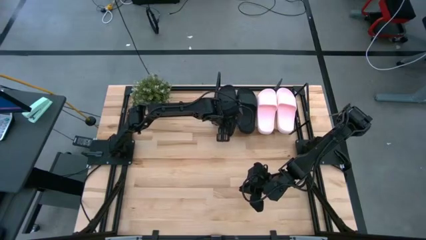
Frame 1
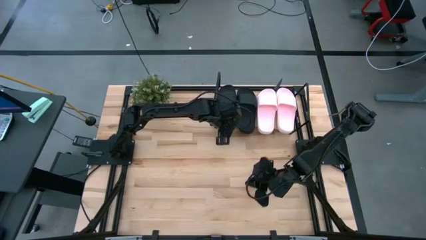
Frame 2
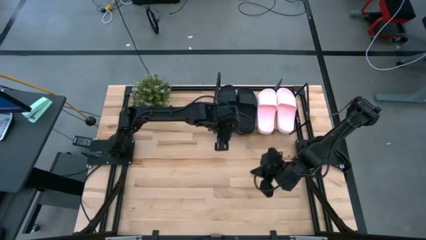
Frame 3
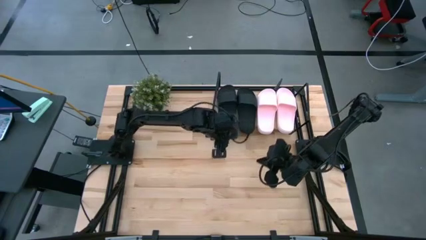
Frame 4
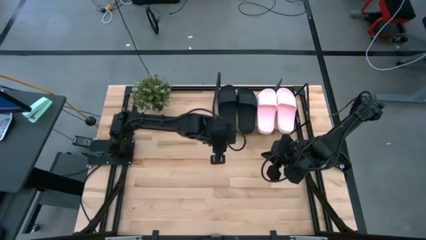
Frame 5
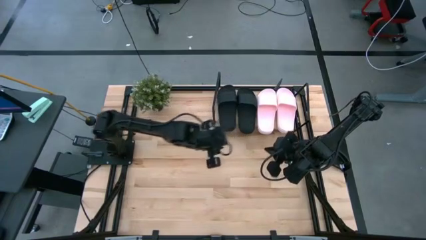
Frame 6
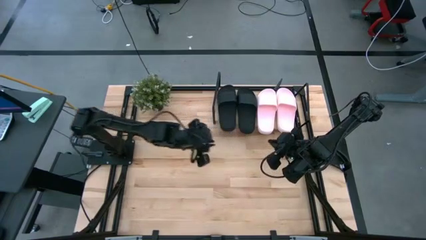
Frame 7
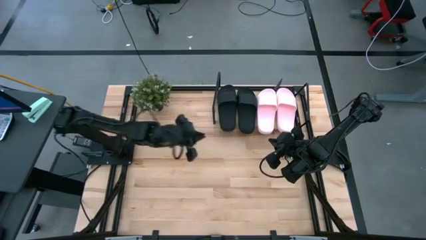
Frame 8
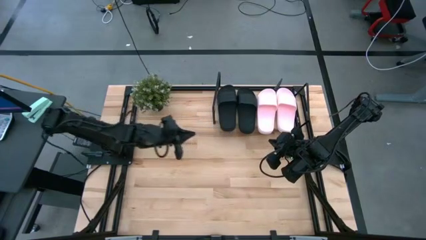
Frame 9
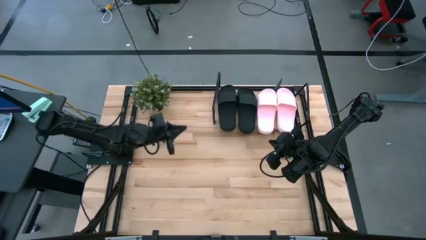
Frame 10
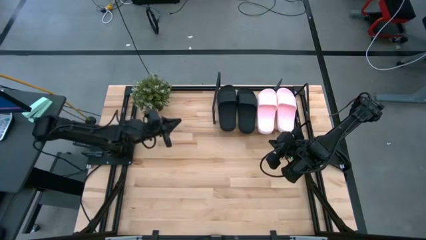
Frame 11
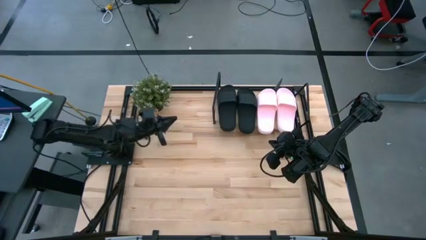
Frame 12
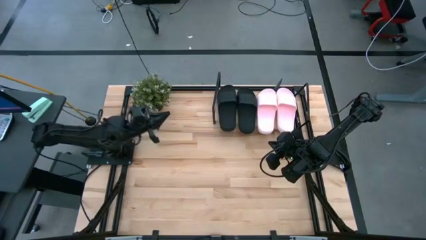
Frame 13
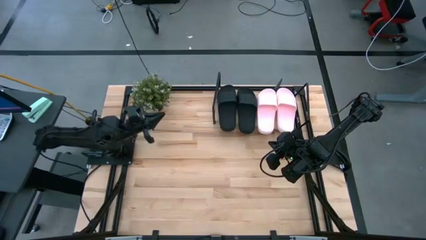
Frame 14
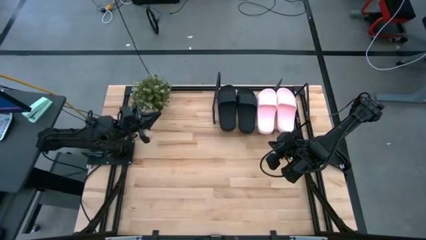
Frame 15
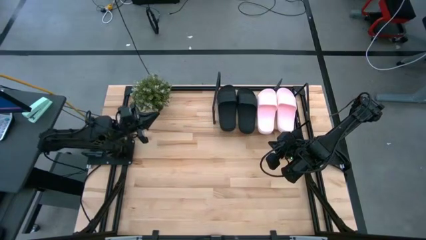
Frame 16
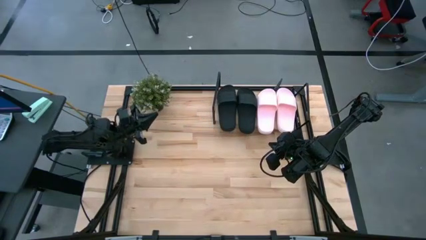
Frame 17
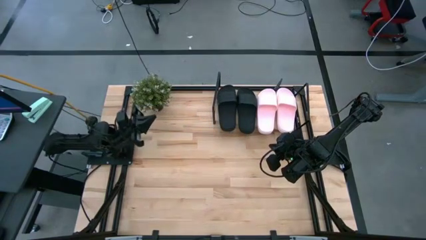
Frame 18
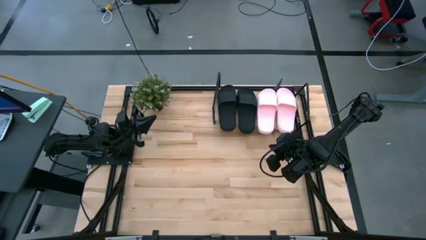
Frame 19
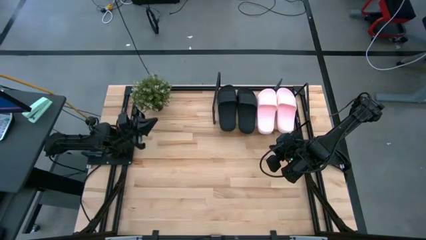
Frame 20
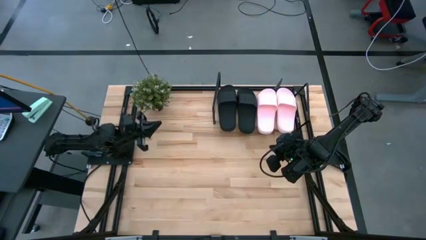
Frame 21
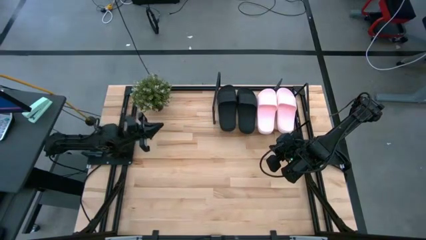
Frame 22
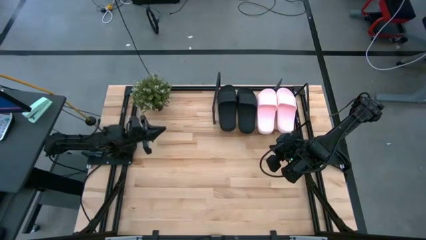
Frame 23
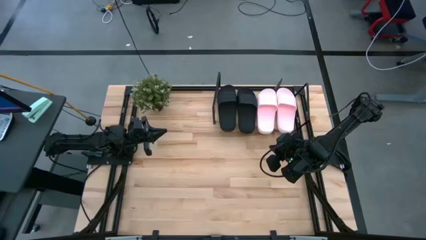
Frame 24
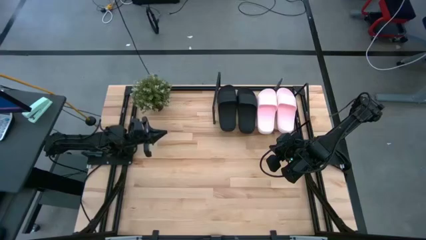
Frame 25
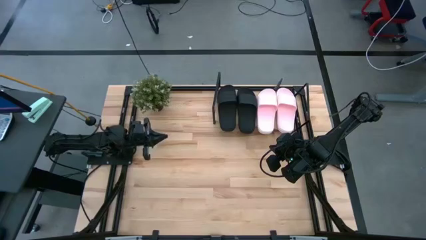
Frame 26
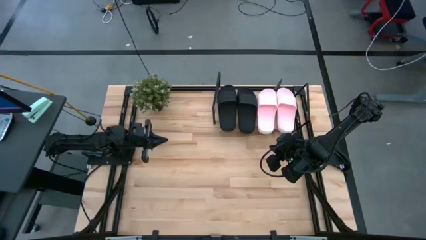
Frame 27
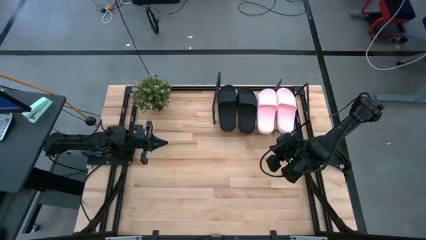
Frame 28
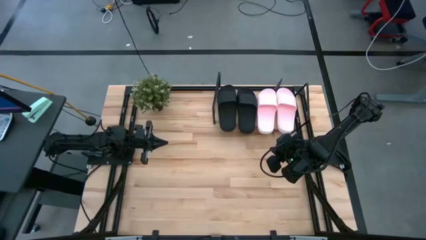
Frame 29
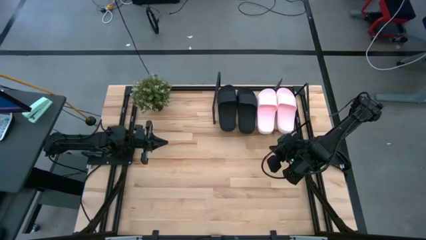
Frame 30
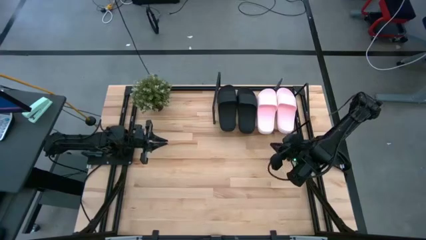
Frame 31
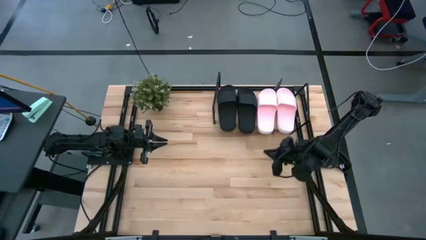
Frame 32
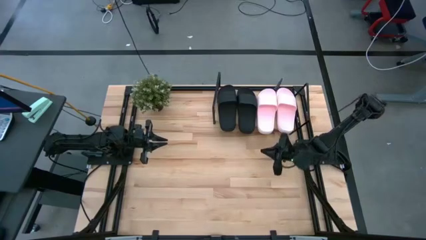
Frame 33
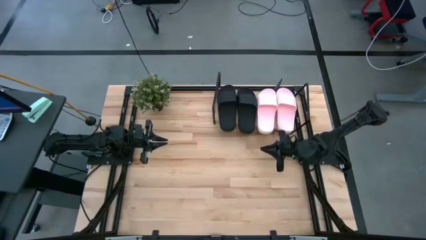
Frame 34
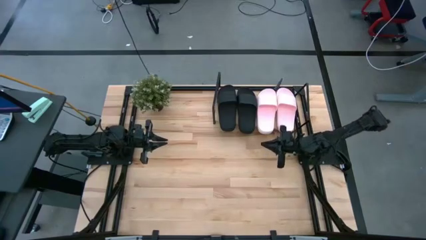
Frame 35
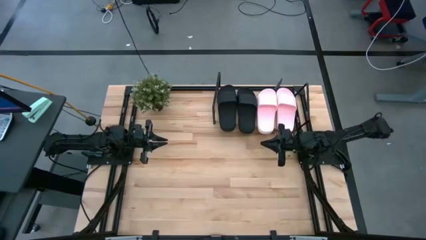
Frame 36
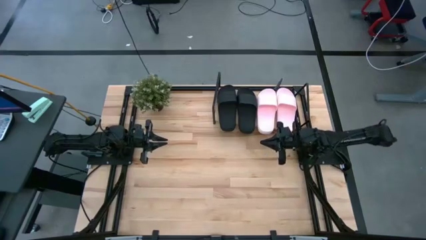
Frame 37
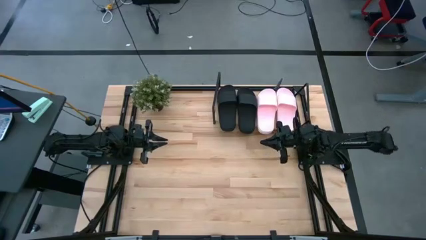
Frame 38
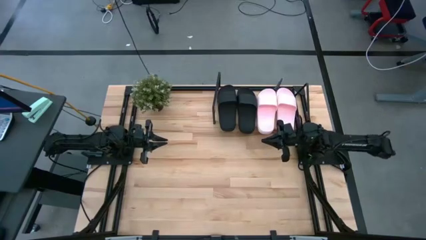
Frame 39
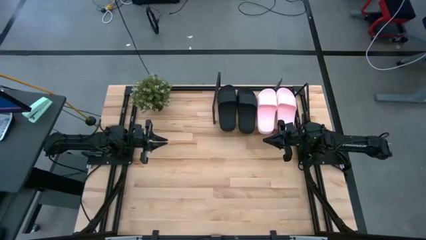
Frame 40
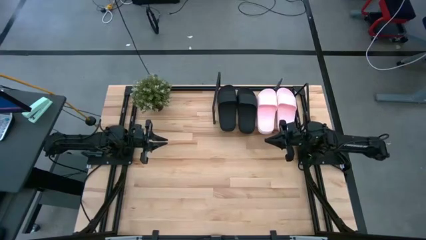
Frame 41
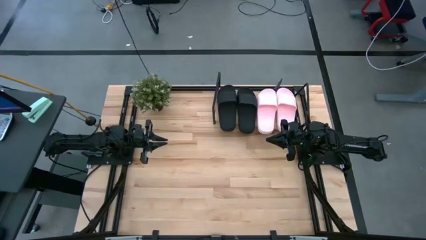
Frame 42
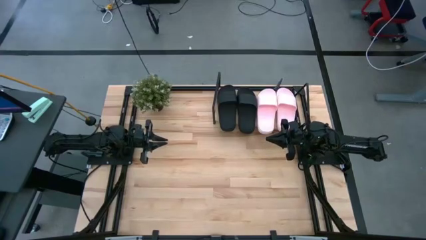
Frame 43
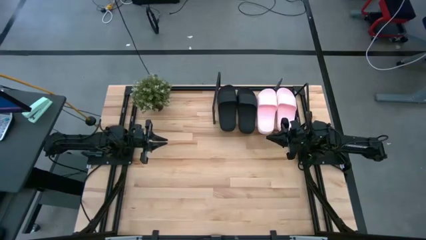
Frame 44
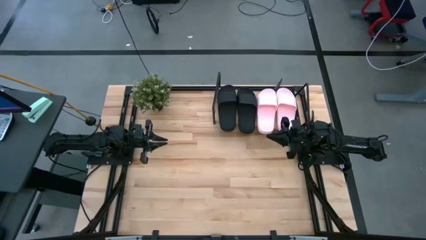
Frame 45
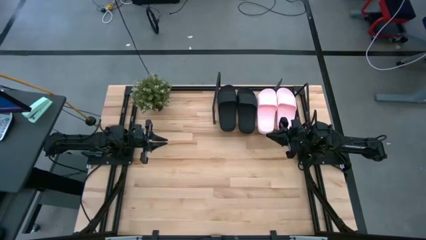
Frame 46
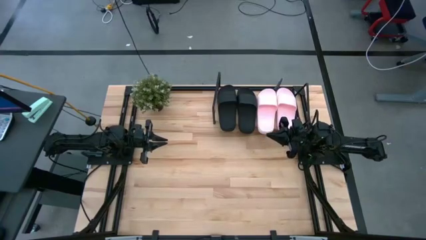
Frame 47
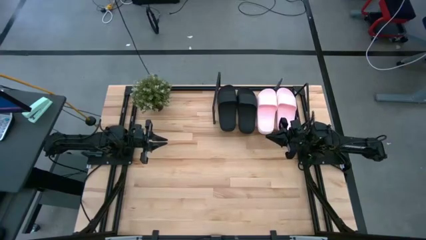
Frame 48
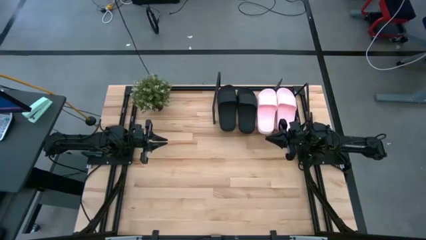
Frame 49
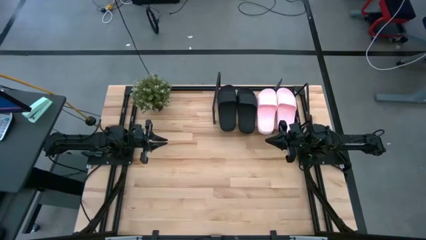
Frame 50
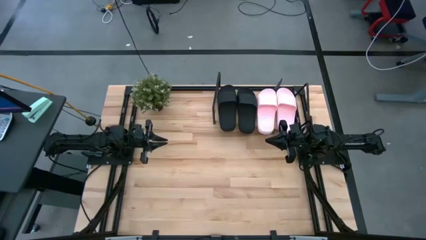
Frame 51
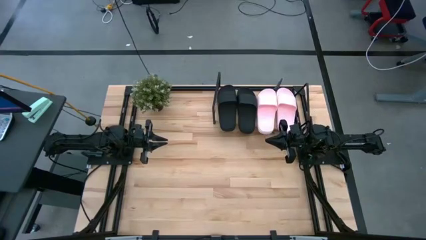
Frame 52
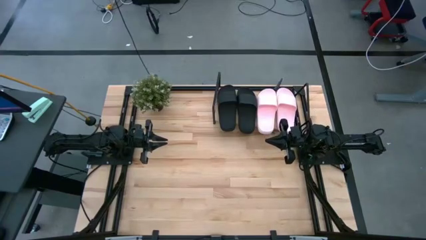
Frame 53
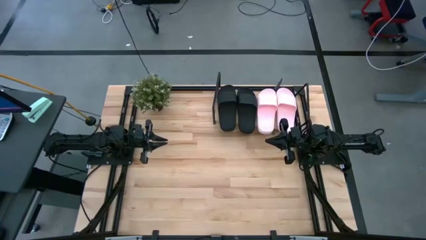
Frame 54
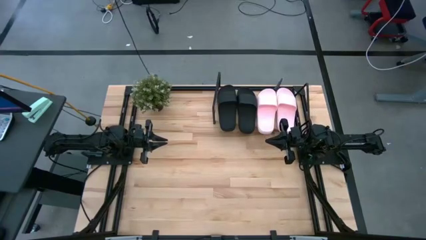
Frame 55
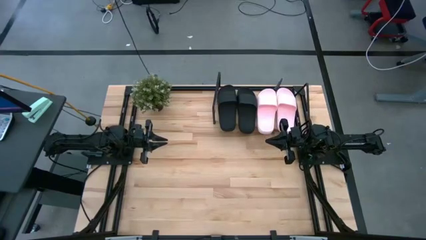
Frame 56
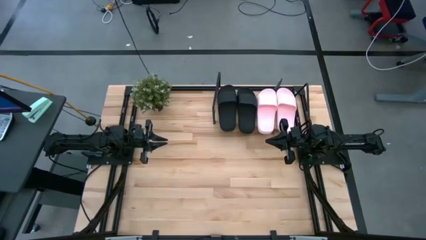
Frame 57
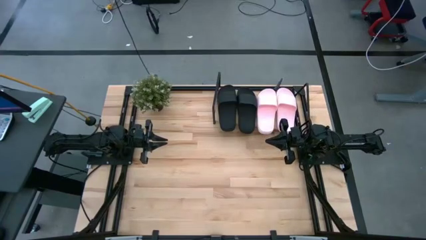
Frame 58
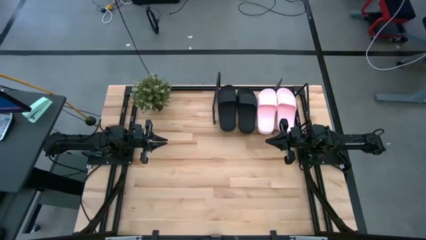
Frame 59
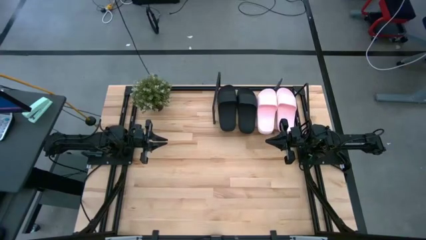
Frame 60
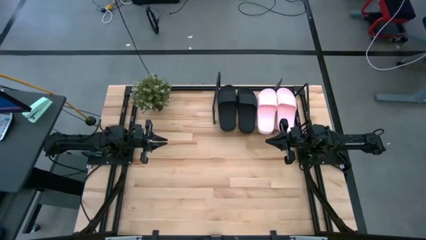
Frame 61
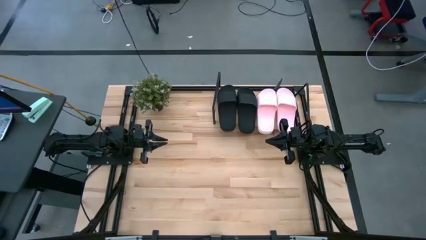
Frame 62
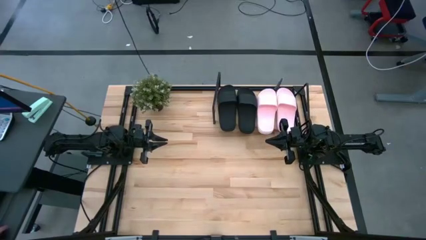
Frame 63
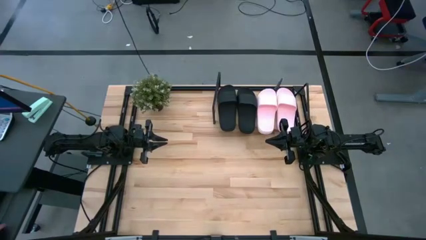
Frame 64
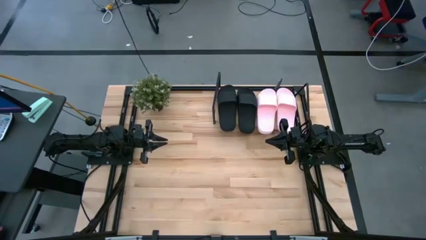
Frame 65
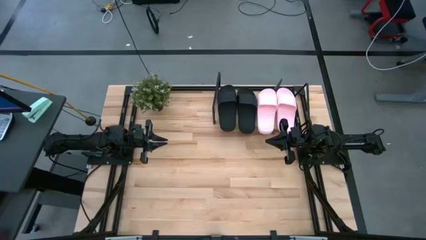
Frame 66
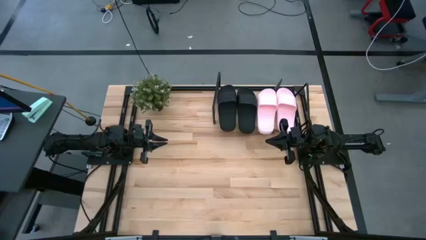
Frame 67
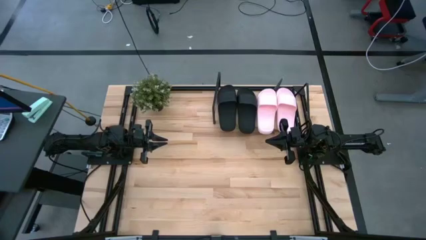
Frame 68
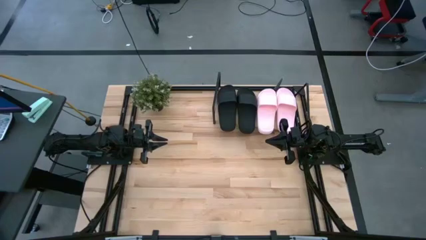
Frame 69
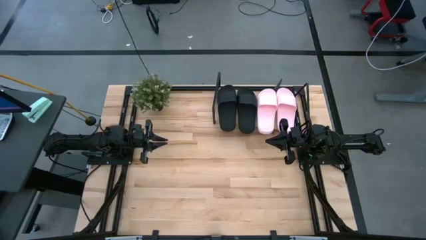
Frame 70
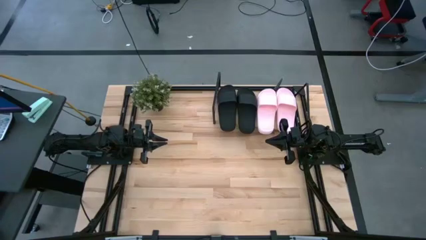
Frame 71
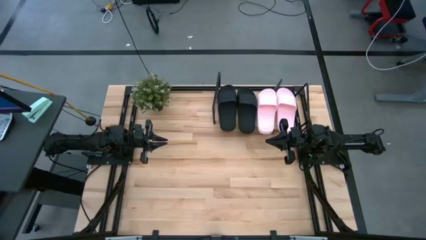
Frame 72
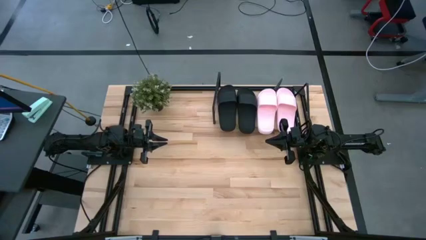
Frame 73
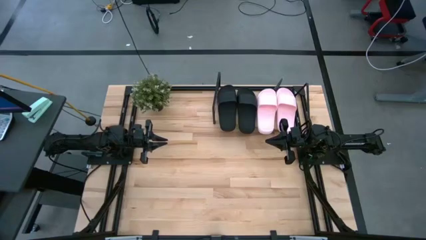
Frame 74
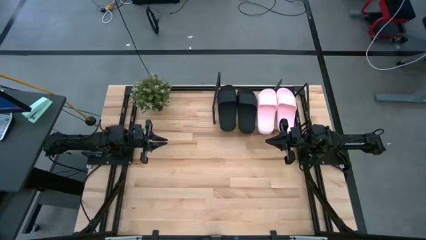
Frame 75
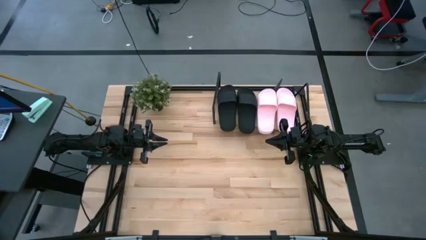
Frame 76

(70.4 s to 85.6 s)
Task: Pick and place slides into the shelf
Return to Home Position

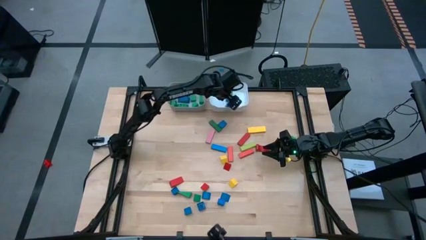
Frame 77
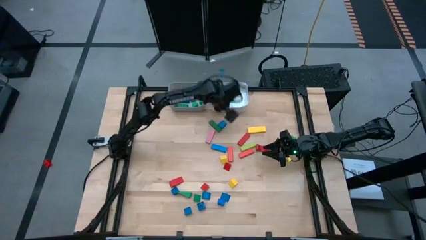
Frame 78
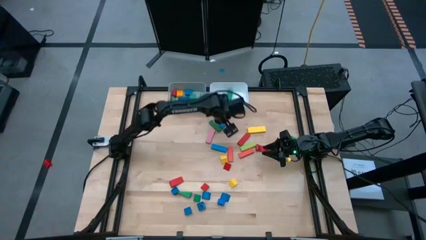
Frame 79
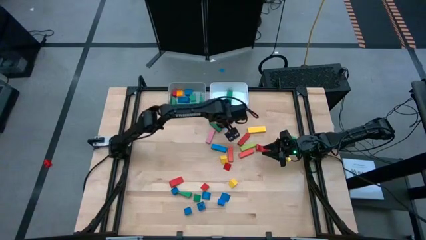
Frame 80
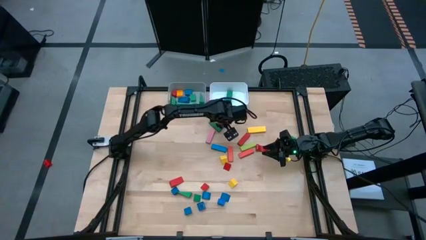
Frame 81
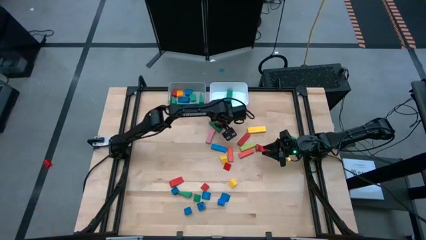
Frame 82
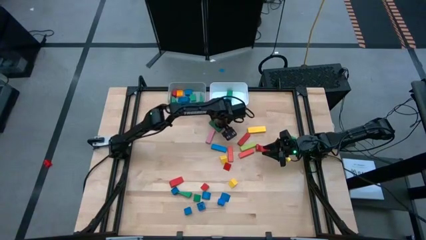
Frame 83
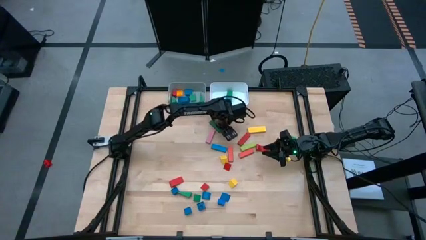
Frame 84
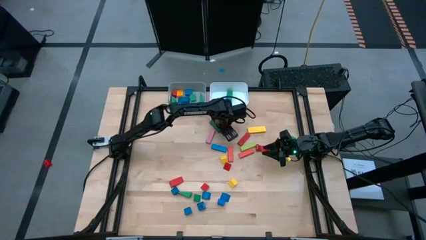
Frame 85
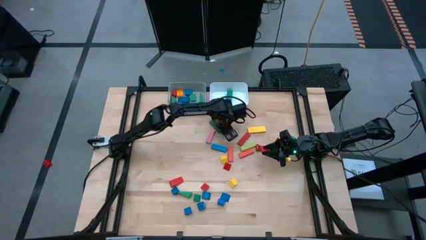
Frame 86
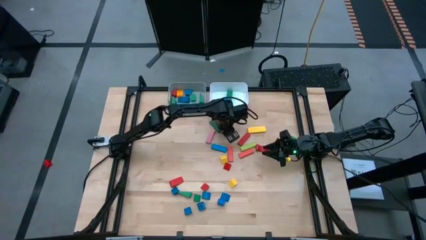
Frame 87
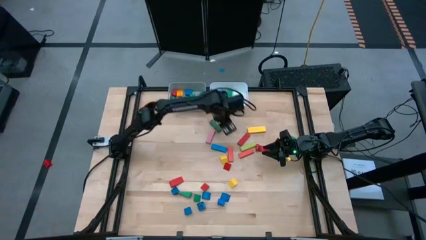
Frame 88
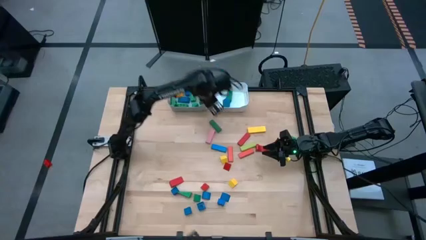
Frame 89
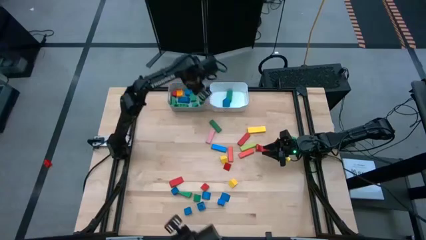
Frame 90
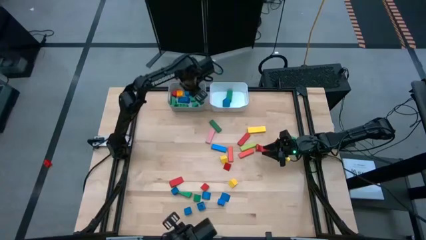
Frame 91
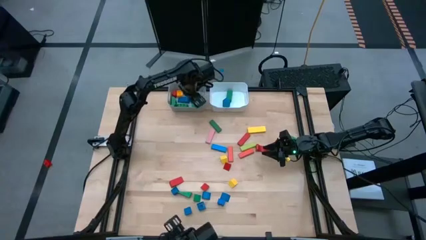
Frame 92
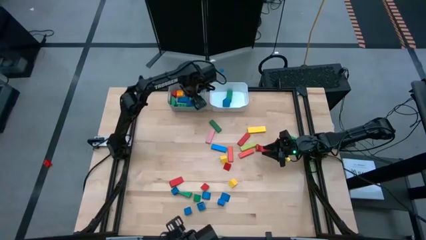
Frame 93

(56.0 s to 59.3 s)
Task: Sort blocks by size
Put the blue square block into the gray bin
